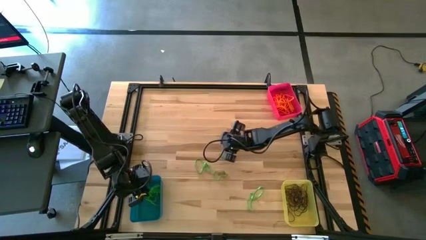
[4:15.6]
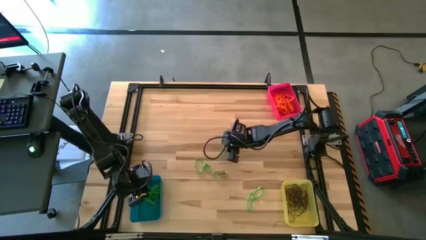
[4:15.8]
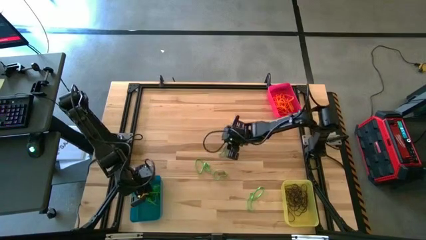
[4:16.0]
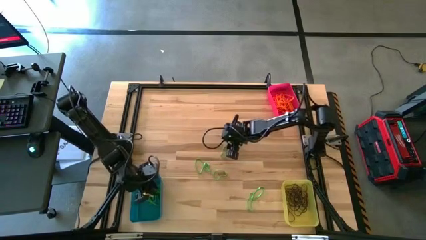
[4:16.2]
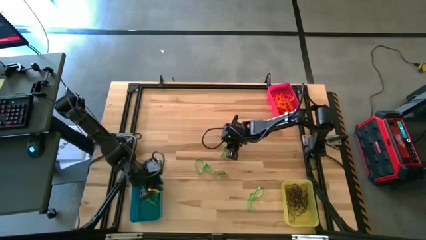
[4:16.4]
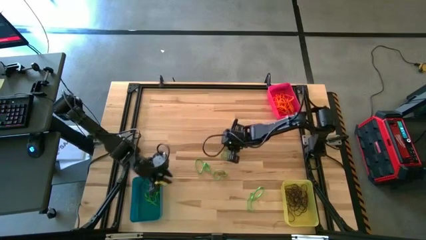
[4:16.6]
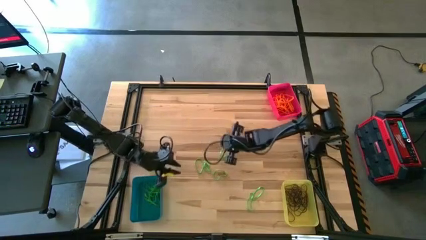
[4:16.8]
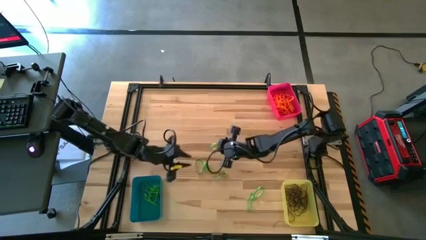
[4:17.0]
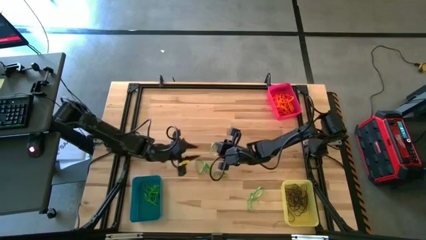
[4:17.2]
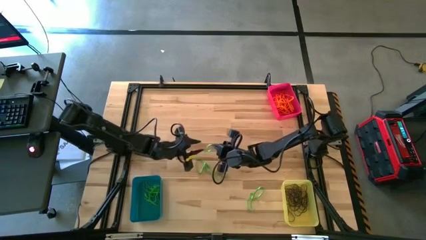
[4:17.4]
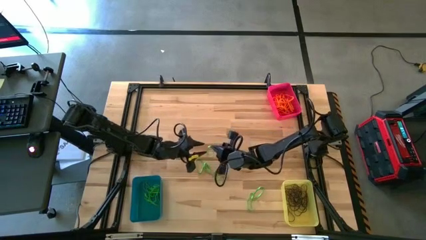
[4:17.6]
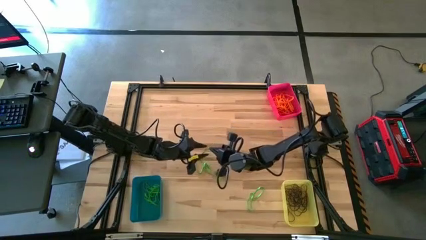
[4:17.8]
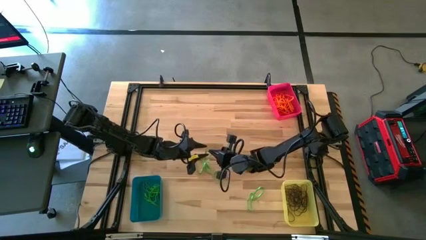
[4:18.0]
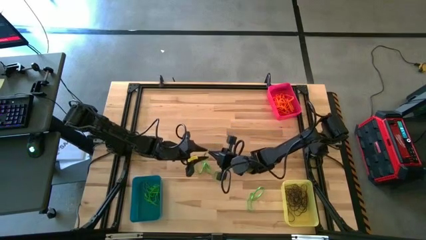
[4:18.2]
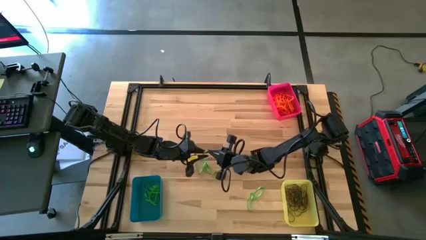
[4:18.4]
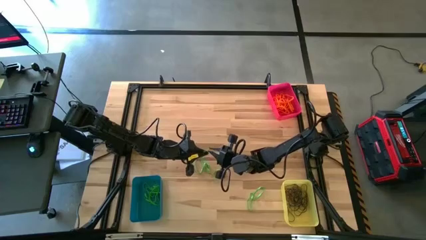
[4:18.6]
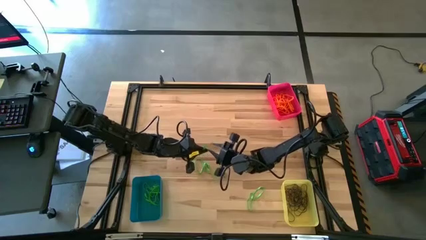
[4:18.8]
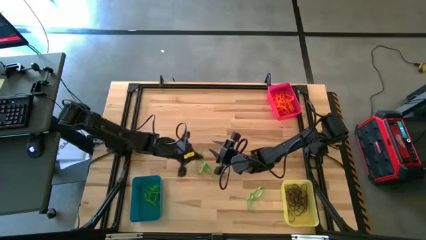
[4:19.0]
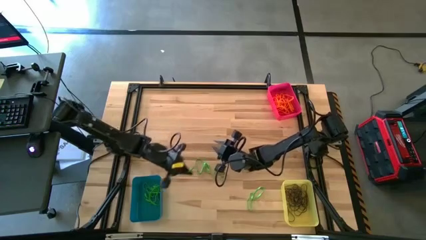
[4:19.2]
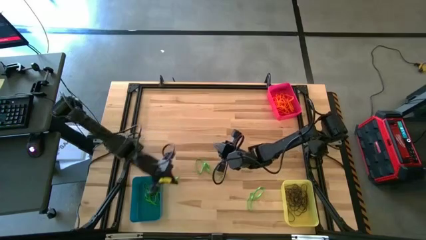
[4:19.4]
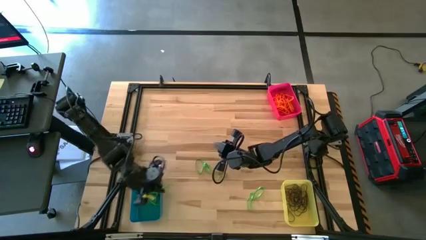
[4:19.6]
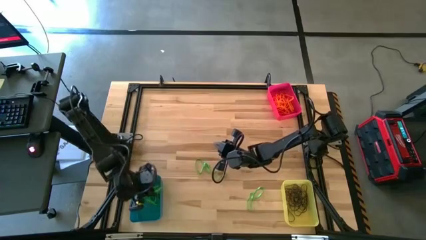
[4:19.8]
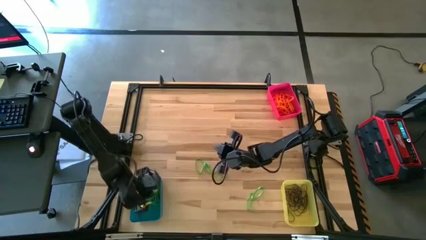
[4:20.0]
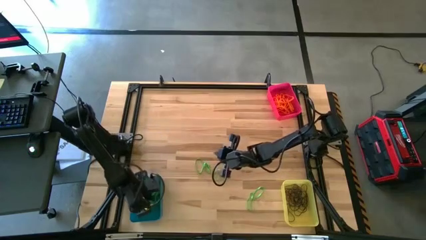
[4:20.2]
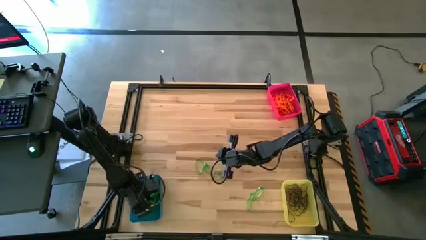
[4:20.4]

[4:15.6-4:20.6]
Task: Sort rubber bands into baskets
Put the green rubber band into the blue bin

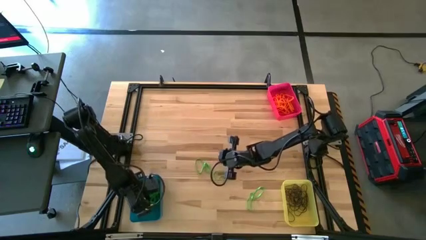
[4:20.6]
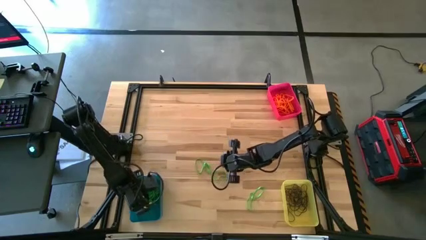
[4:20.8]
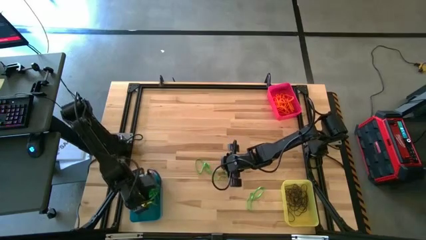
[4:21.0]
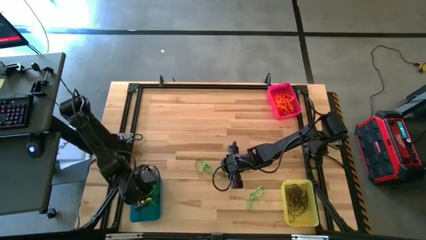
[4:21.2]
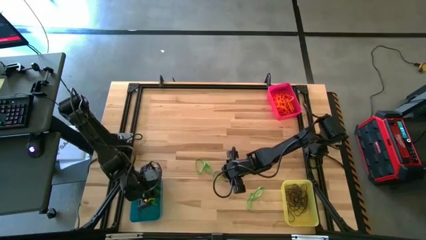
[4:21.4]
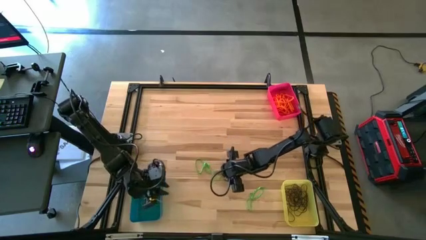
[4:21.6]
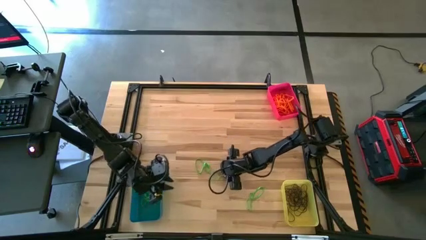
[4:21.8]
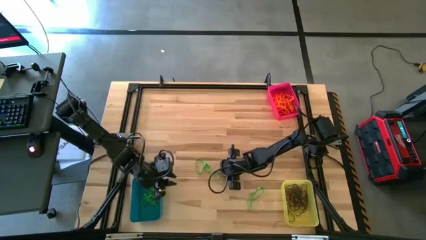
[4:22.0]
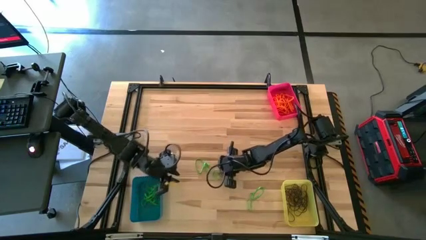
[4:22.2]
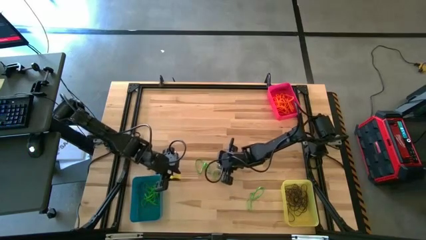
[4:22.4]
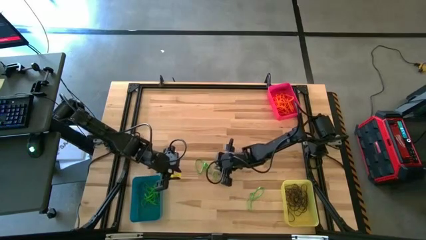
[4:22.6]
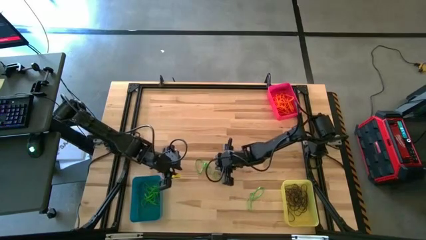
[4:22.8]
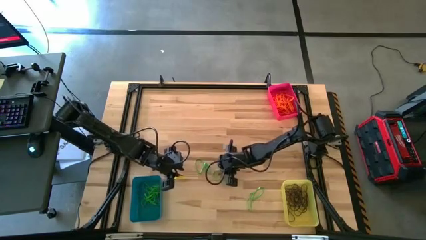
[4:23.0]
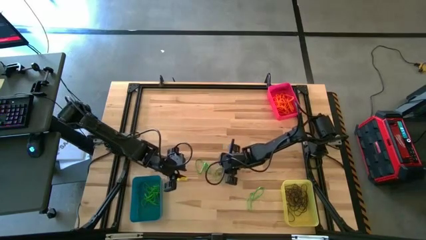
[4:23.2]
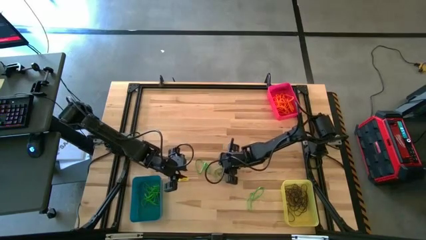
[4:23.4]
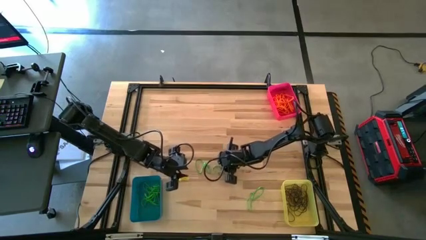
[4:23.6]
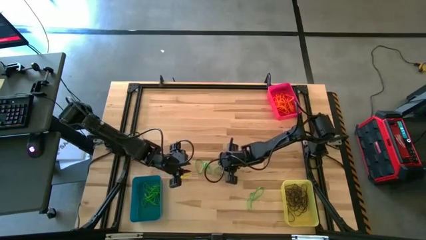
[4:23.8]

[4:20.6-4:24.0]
Put the green rubber band into the blue bin

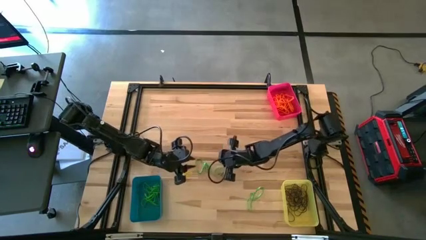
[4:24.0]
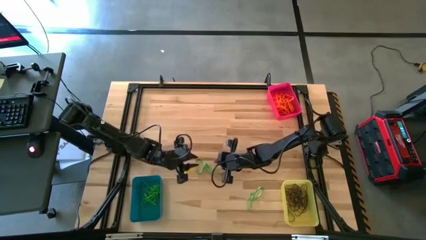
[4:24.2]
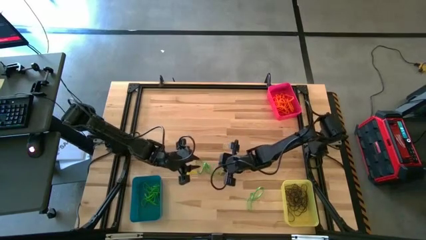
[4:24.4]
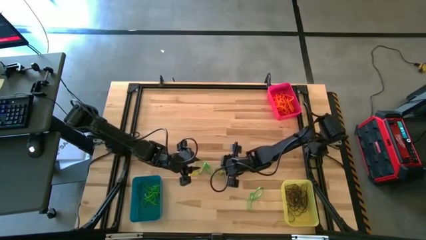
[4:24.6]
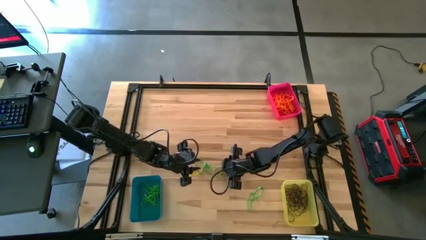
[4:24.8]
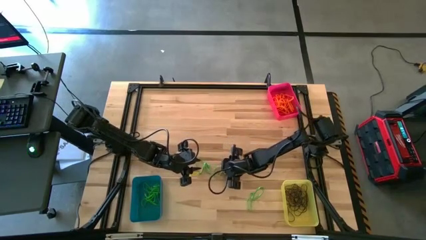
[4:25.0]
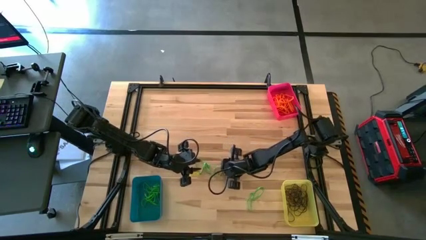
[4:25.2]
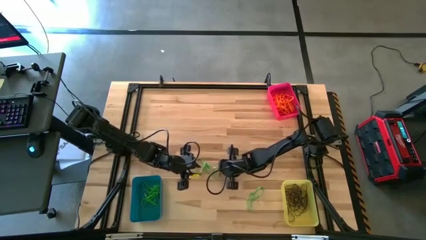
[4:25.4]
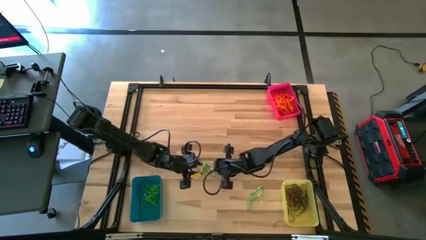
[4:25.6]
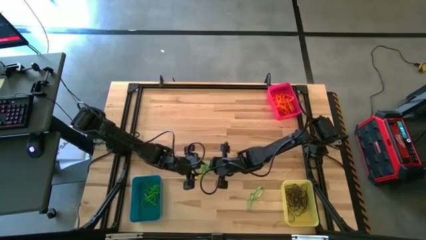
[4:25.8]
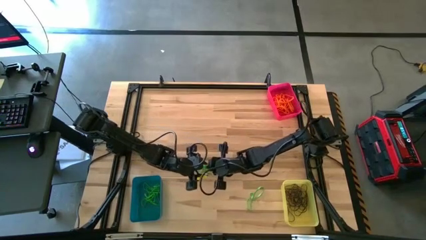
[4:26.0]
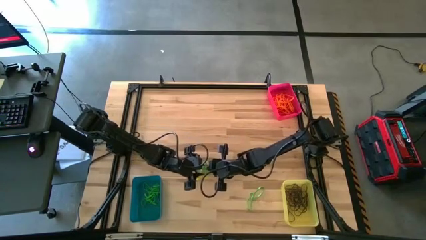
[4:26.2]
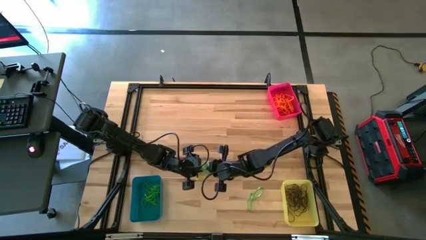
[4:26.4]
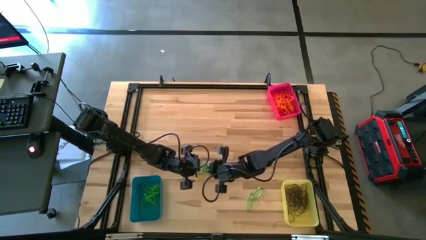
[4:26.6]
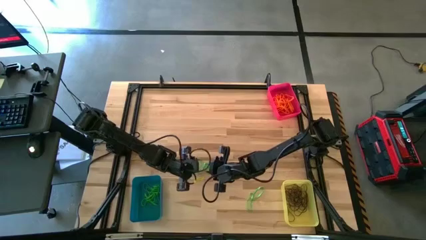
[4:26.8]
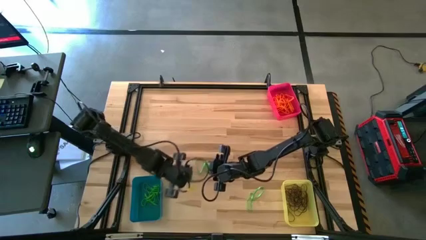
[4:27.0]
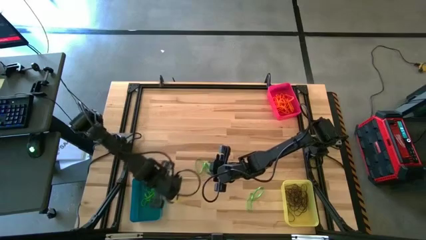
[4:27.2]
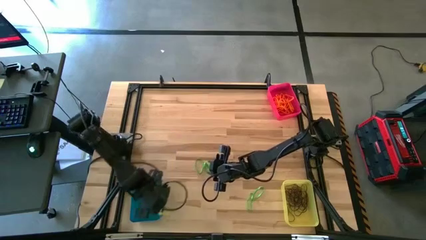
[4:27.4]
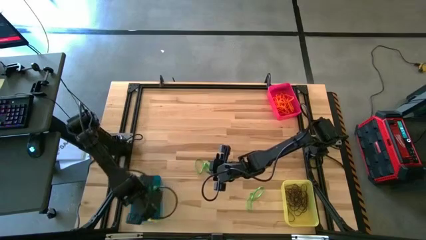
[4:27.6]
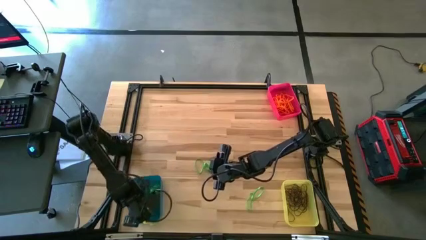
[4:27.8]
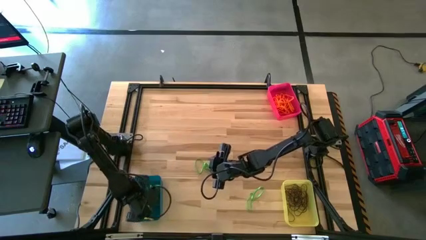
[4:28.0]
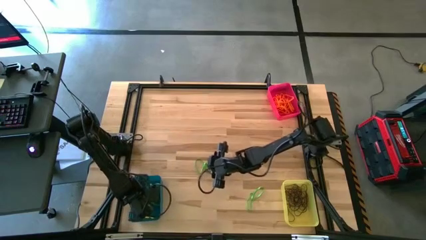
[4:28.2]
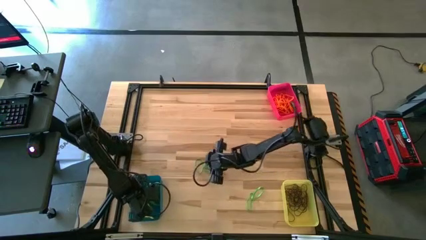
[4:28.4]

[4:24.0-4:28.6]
Put the green rubber band into the blue bin

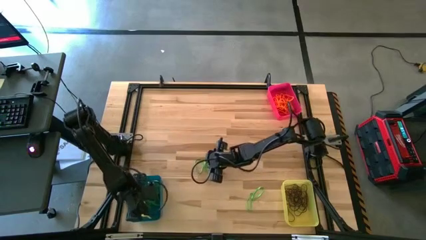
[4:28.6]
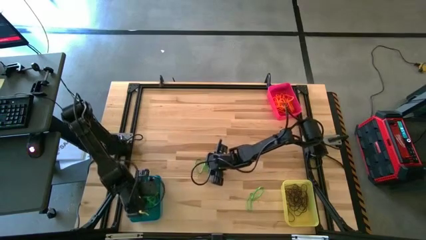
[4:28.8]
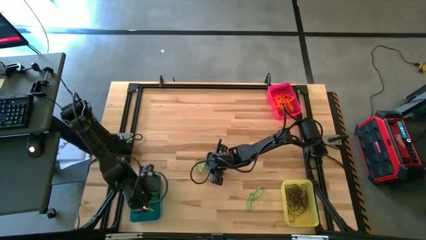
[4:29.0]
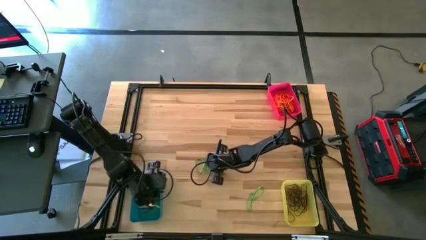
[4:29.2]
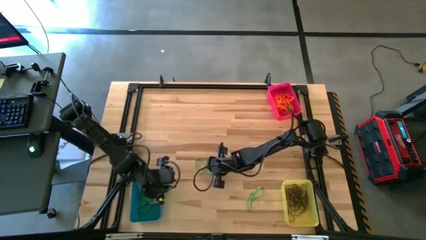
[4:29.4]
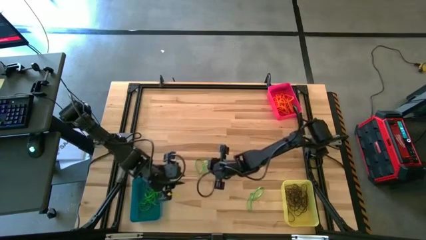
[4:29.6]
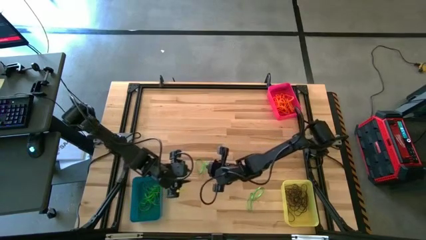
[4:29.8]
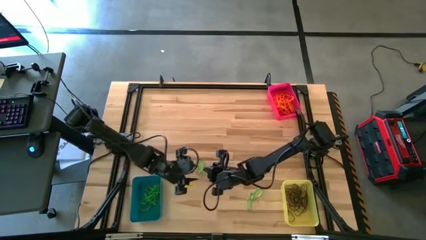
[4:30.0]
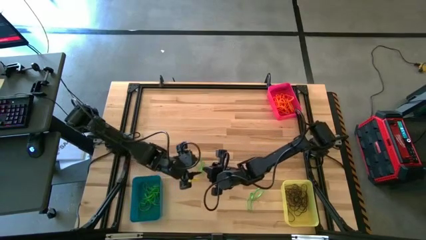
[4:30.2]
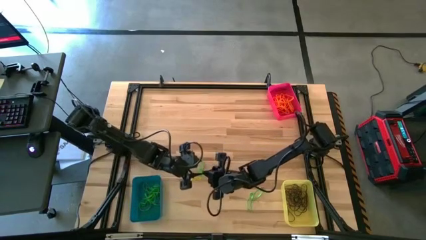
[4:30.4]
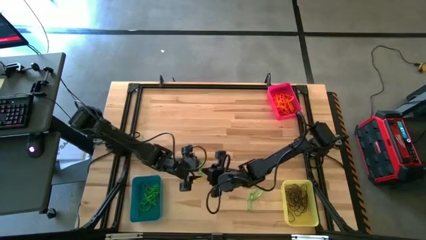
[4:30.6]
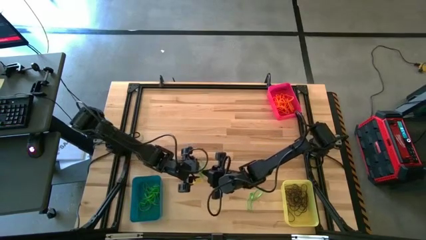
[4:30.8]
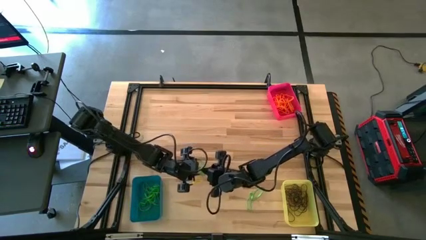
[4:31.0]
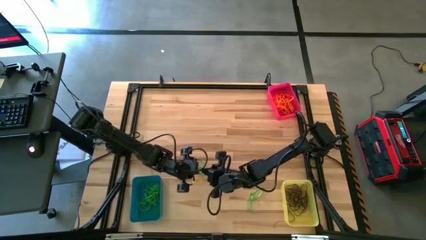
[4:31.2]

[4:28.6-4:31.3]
Put the green rubber band into the blue bin

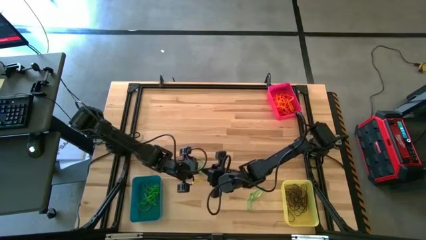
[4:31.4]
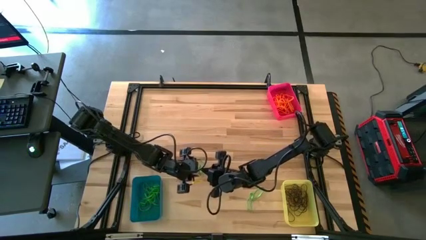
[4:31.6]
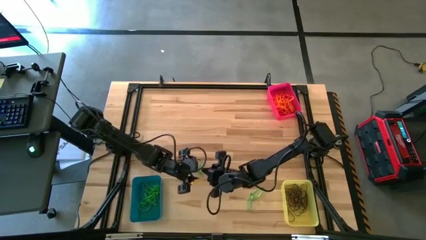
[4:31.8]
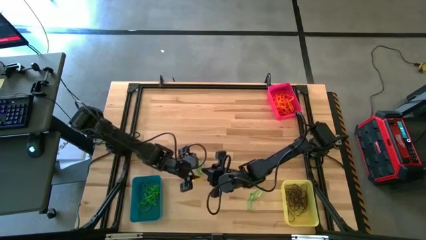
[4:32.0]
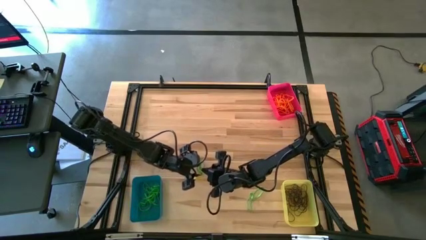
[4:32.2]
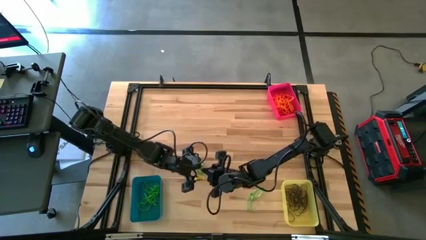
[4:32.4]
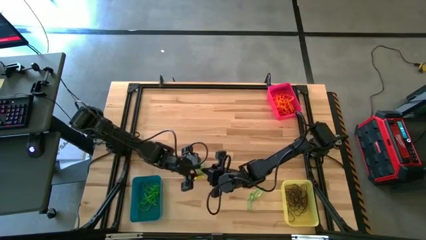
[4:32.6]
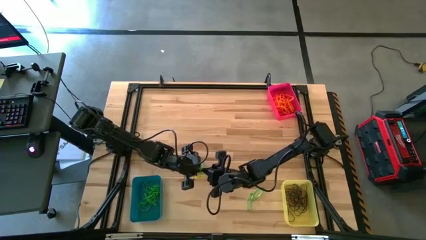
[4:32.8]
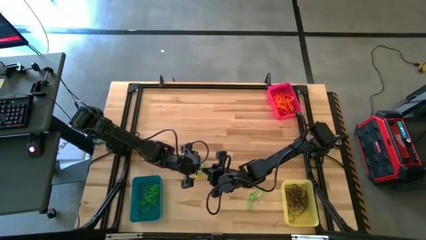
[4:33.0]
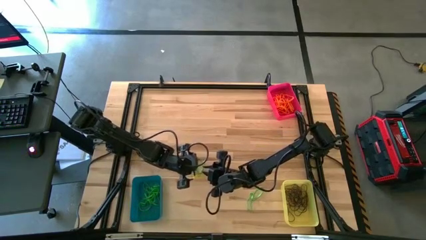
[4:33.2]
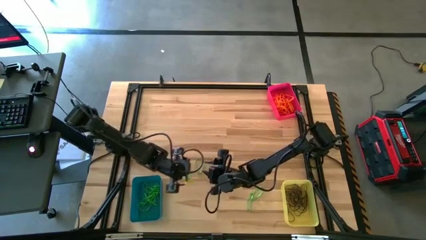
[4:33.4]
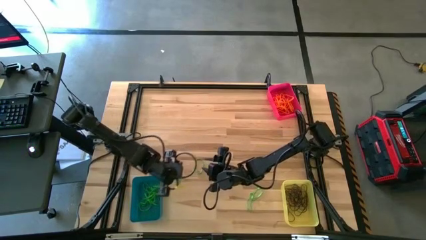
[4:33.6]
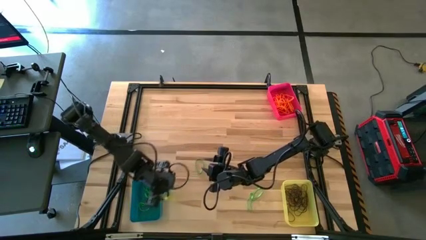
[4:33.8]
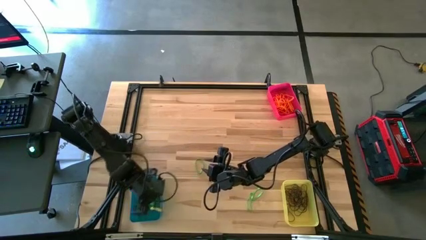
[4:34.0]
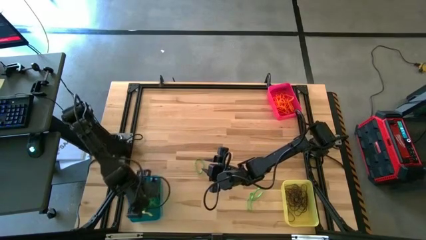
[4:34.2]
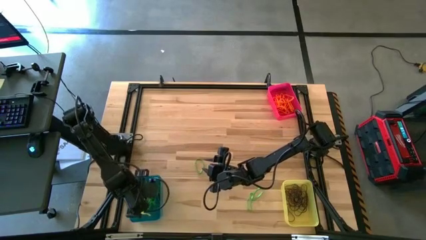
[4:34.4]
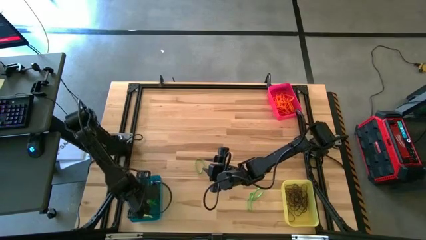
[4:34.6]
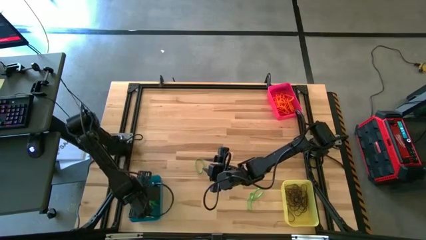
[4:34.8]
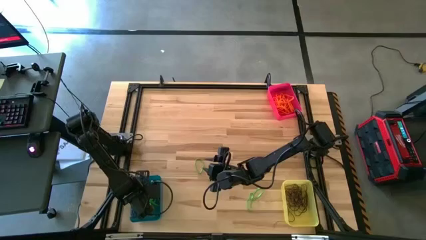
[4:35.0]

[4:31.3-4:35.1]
Put the green rubber band into the blue bin
